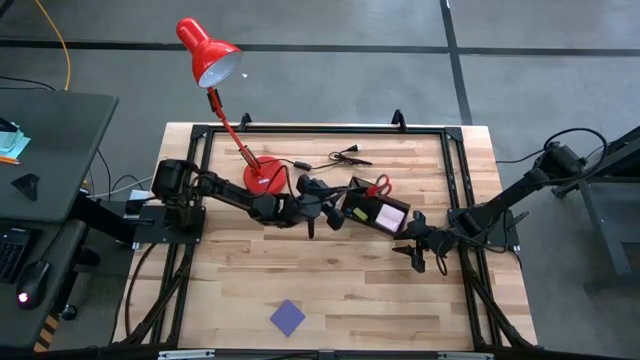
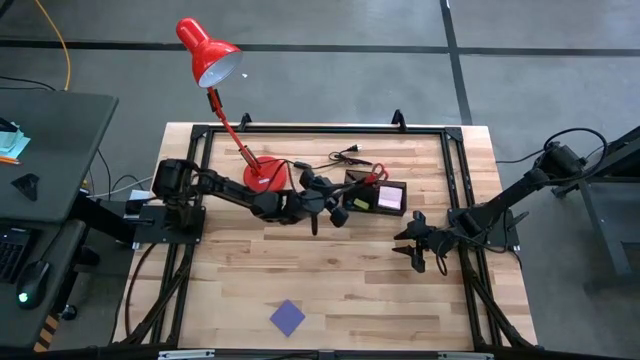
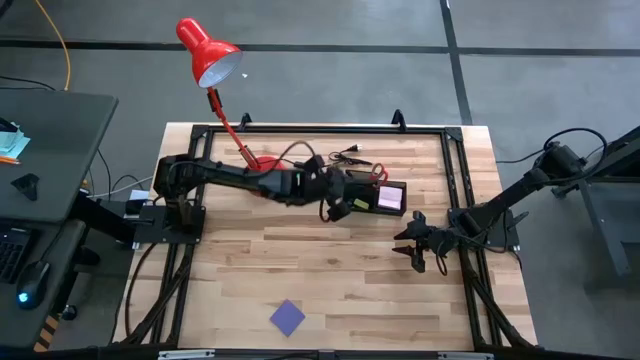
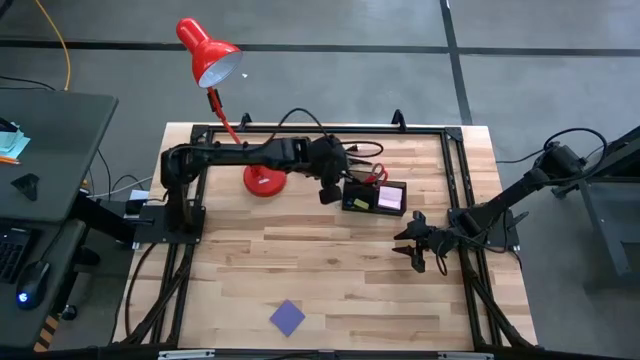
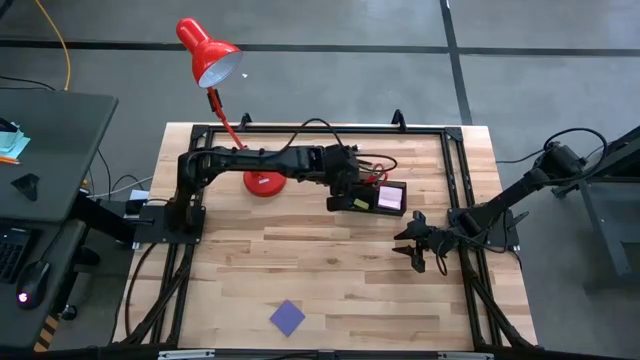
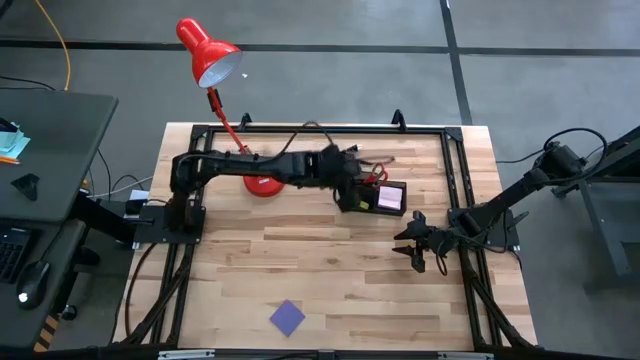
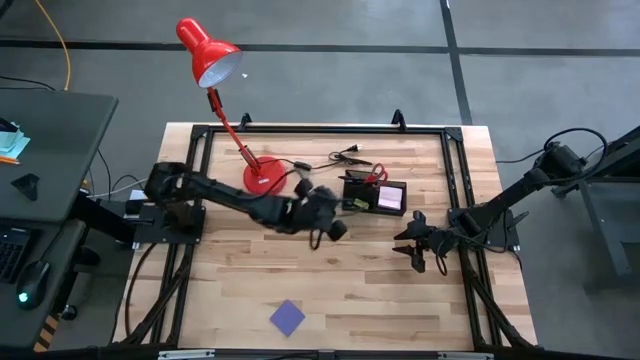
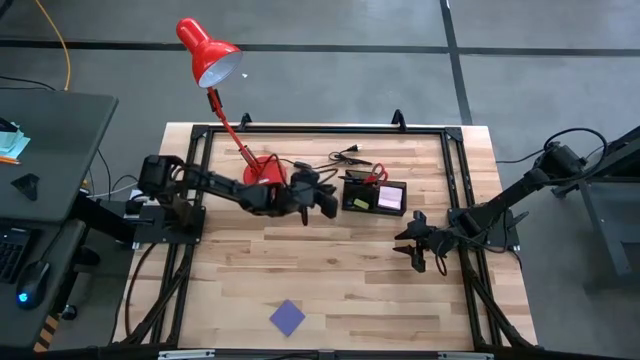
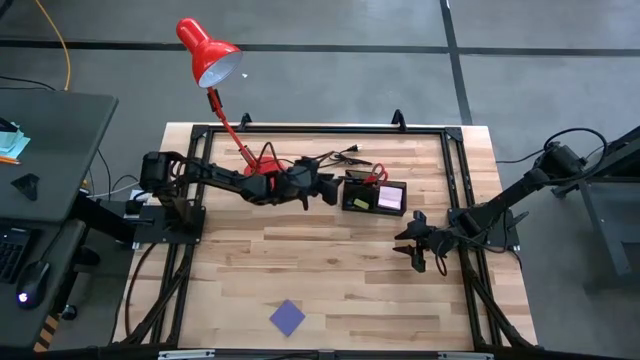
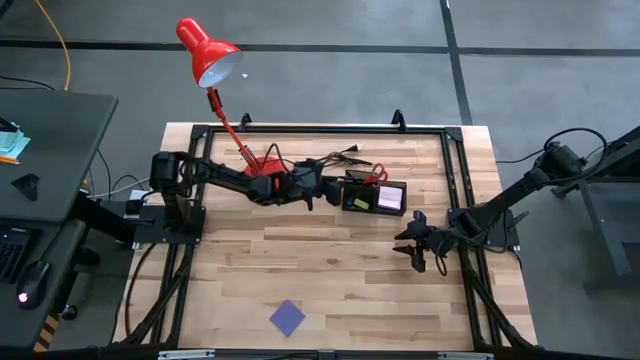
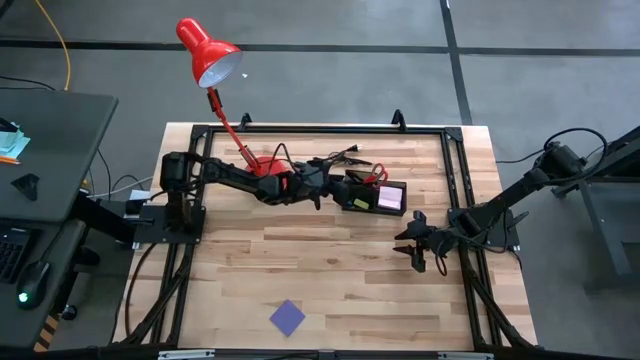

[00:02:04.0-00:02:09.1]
Task: Pick and place office supplies into organizer
Put the black pen into the desk organizer

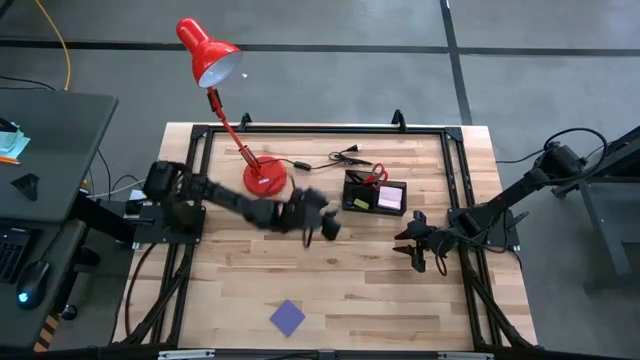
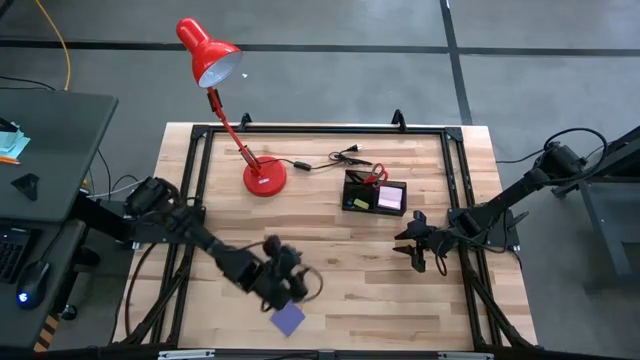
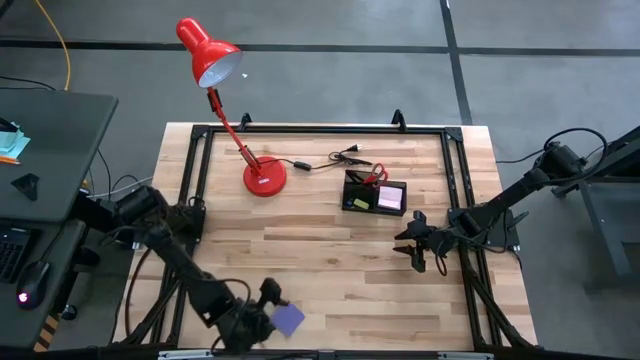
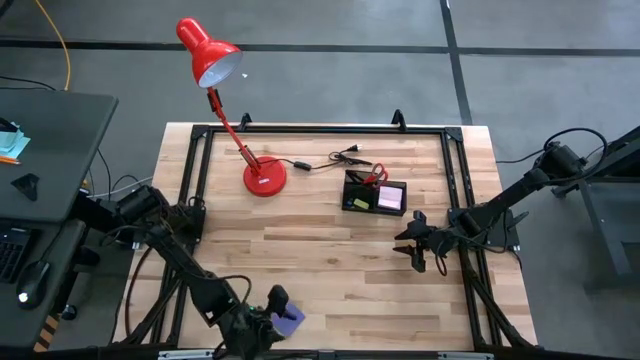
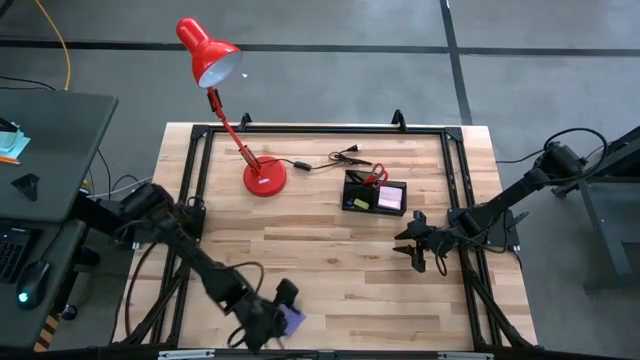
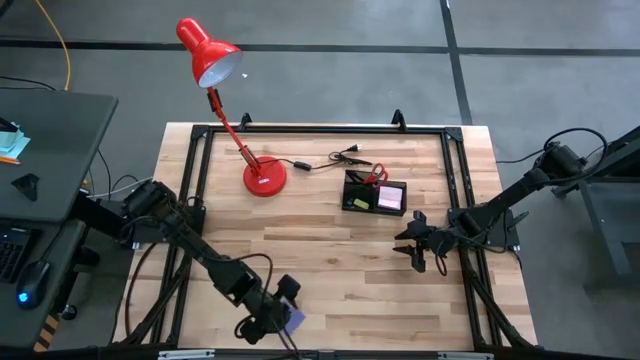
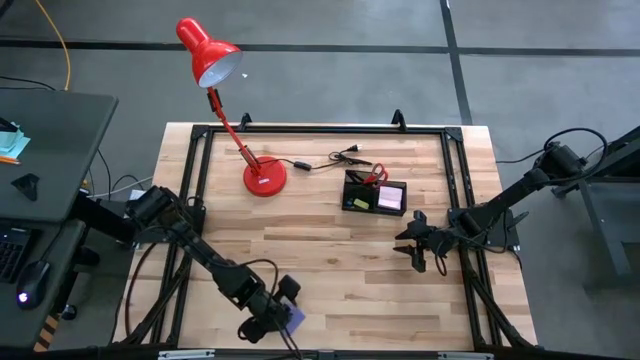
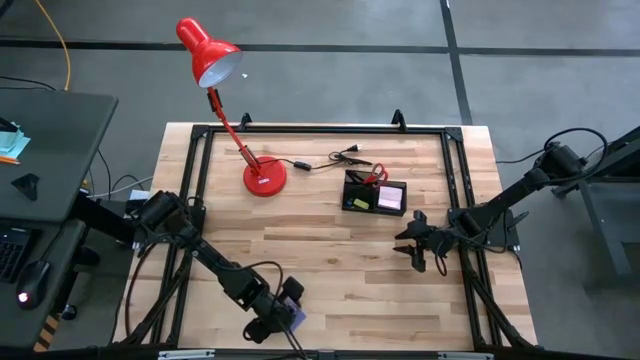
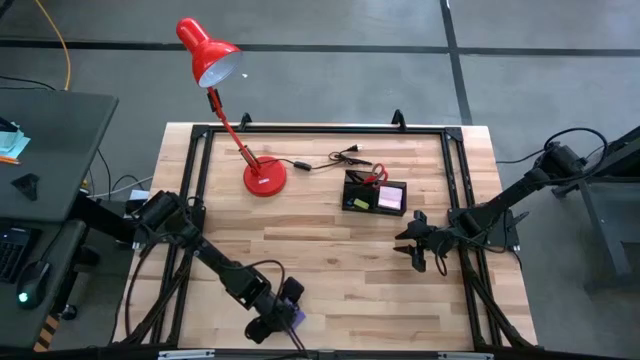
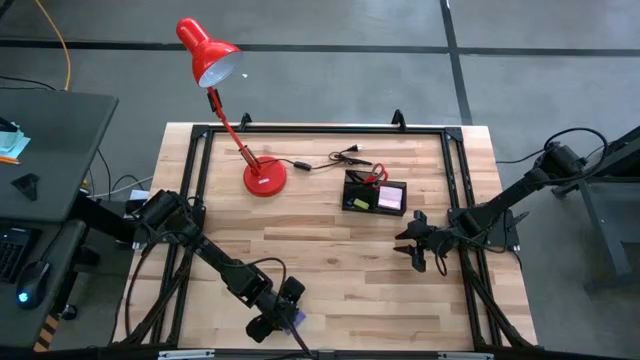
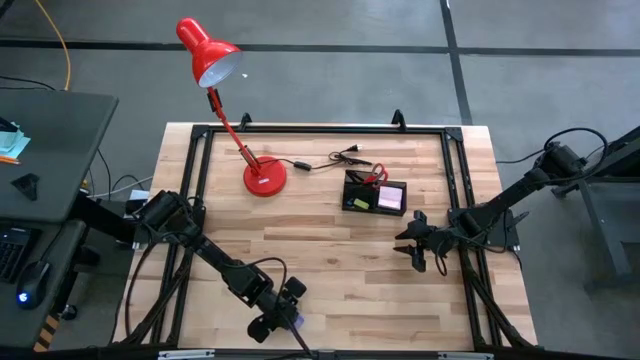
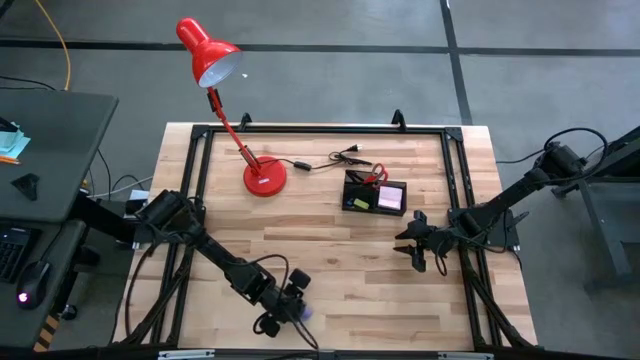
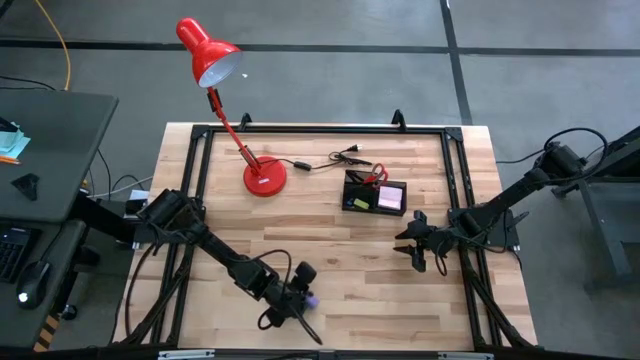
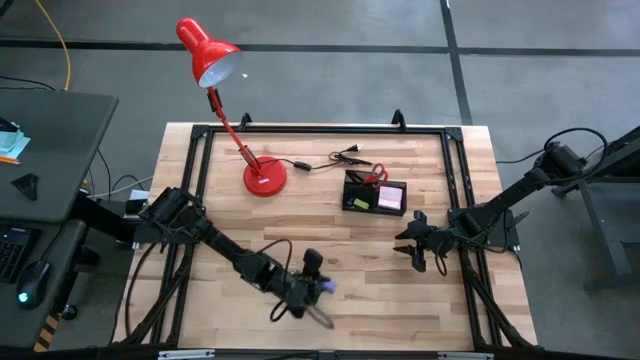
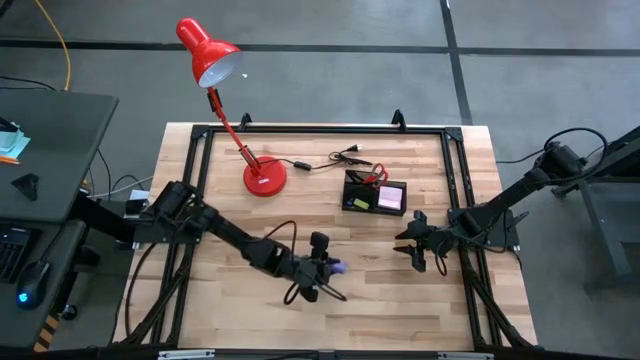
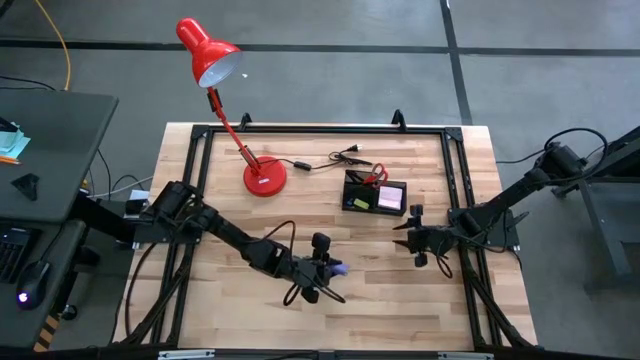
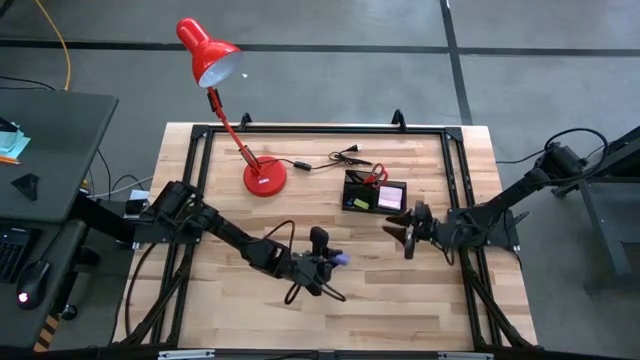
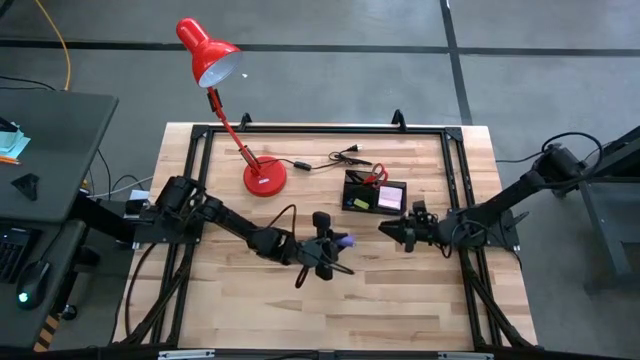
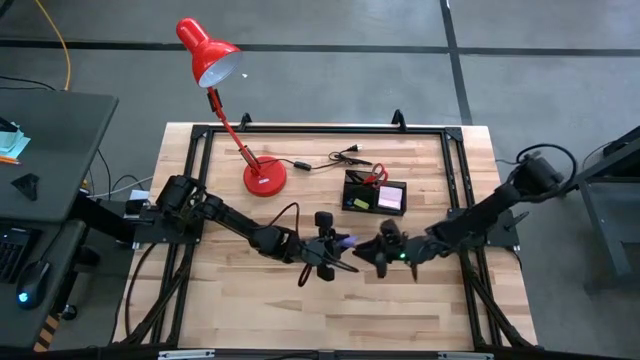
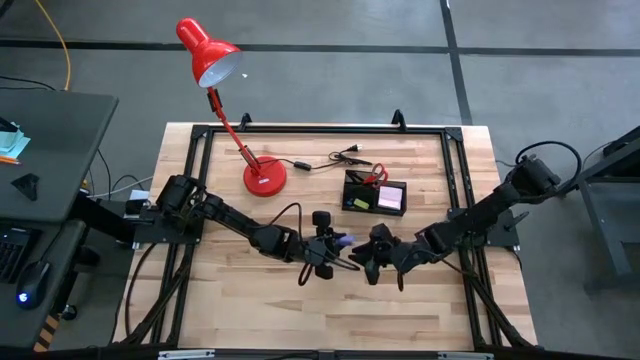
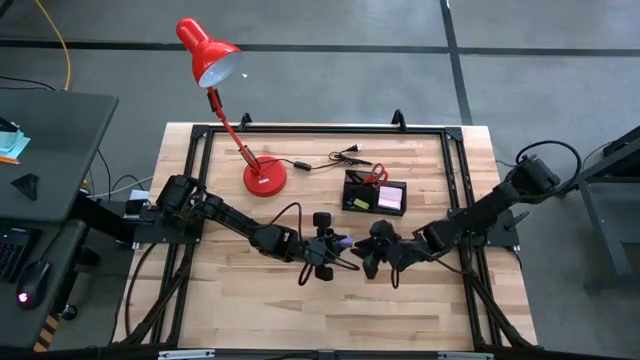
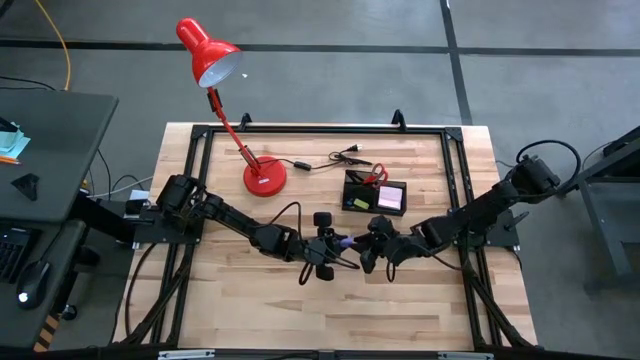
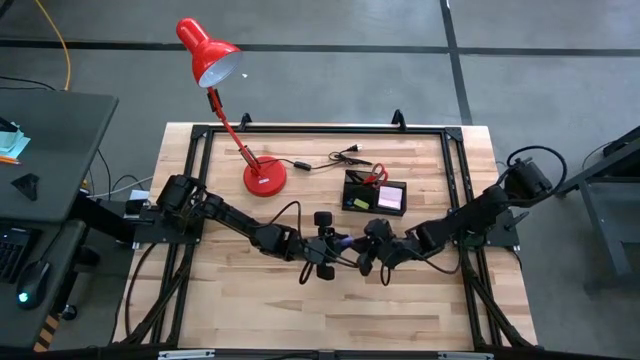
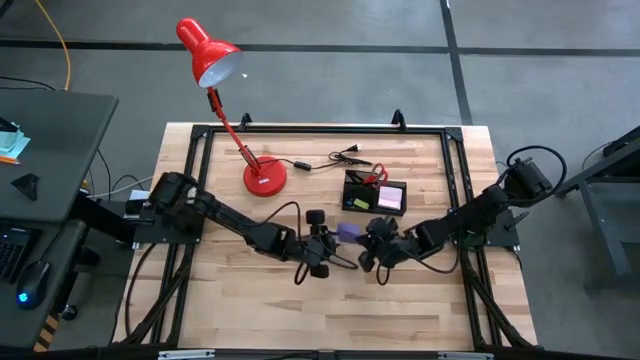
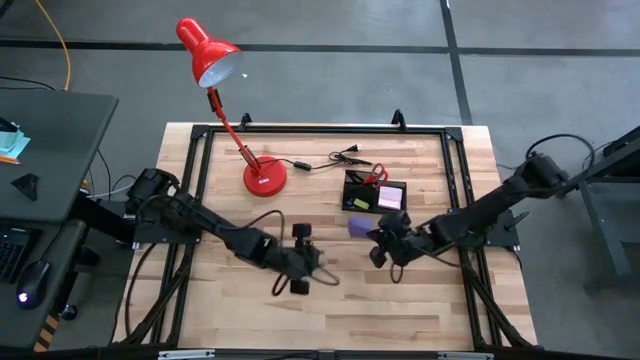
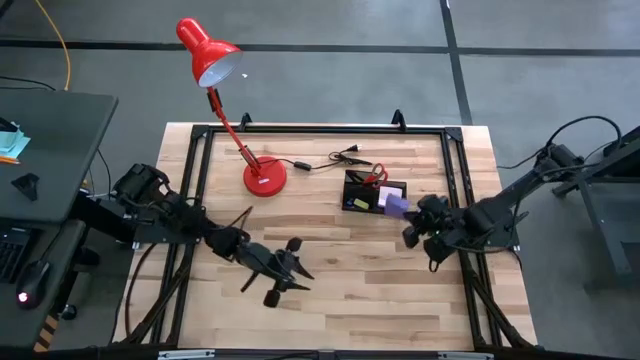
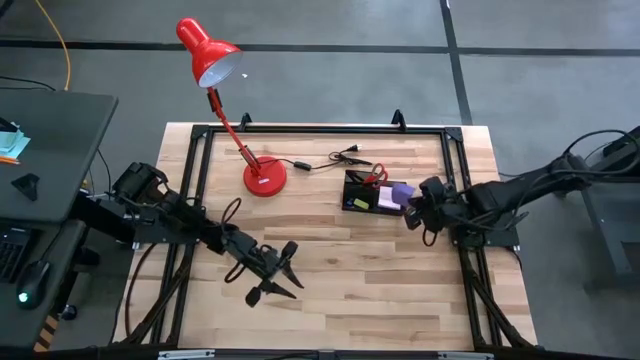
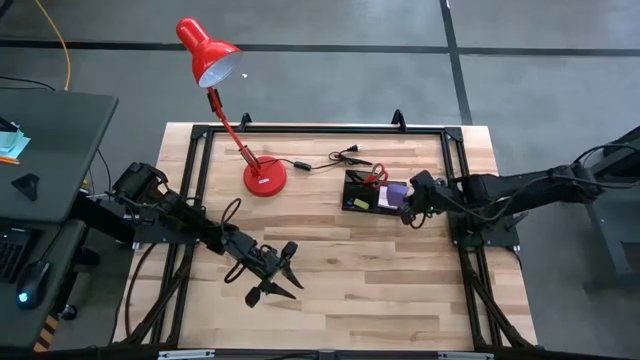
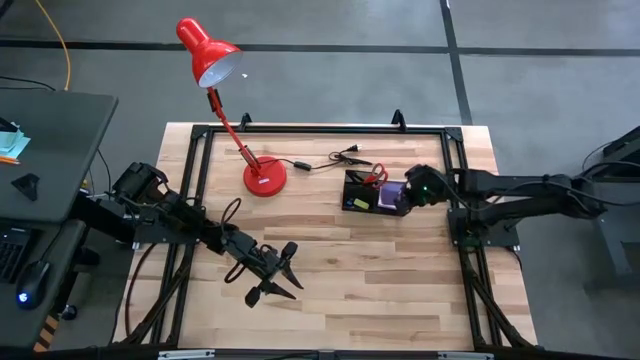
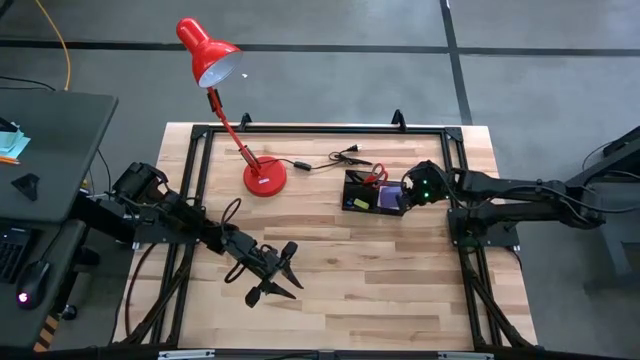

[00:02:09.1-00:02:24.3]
Put the violet sticky note into the desk organizer
